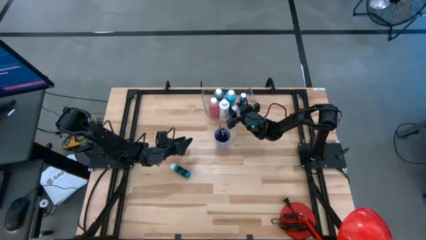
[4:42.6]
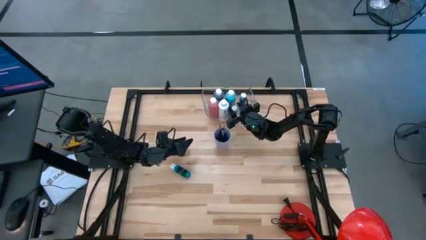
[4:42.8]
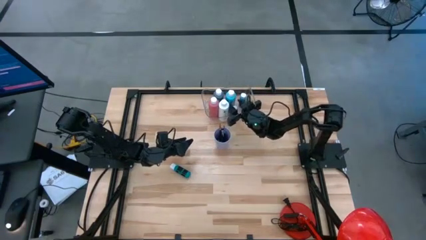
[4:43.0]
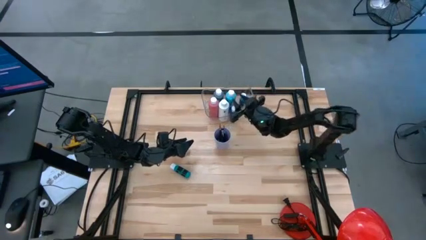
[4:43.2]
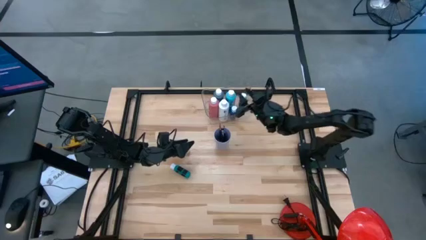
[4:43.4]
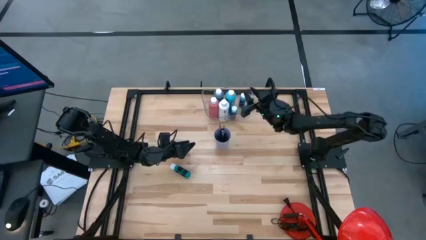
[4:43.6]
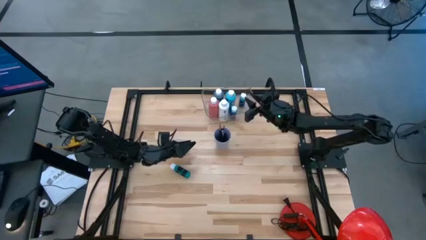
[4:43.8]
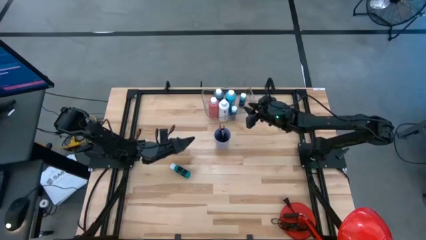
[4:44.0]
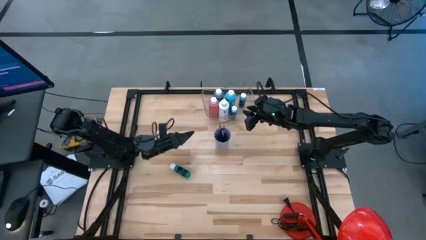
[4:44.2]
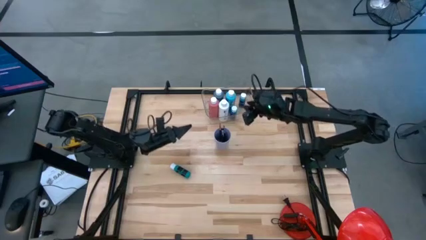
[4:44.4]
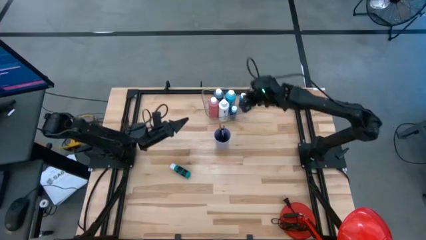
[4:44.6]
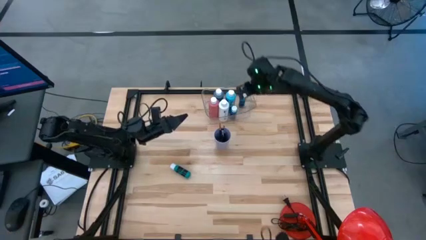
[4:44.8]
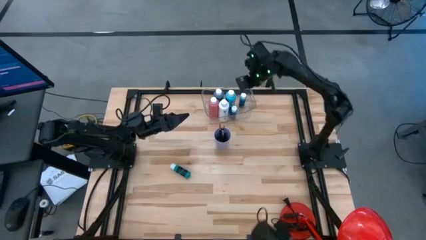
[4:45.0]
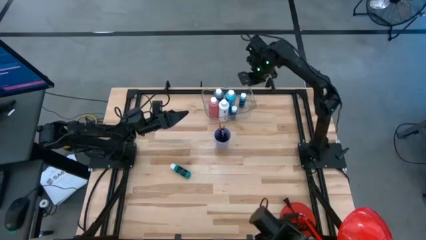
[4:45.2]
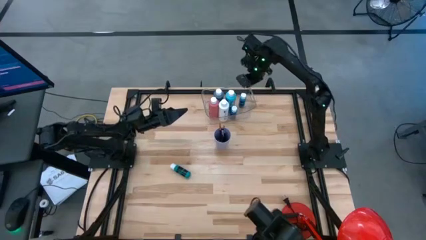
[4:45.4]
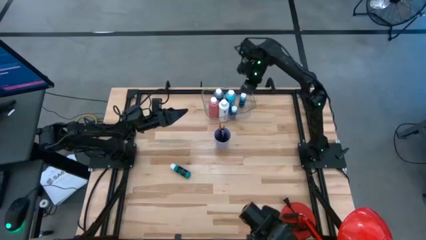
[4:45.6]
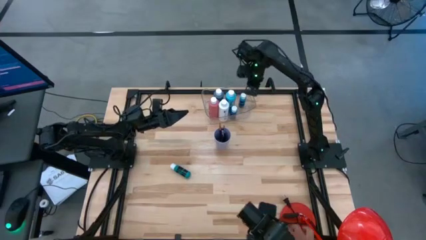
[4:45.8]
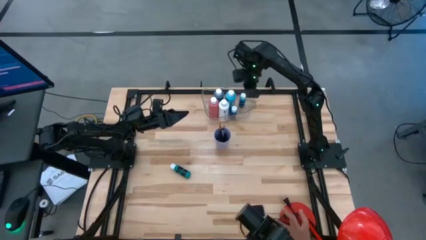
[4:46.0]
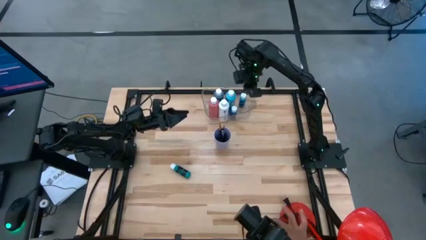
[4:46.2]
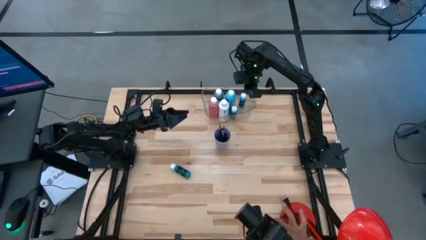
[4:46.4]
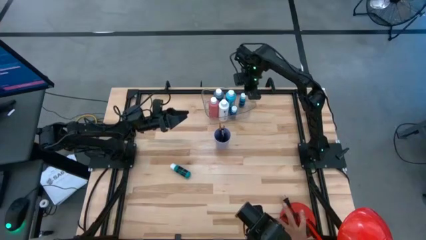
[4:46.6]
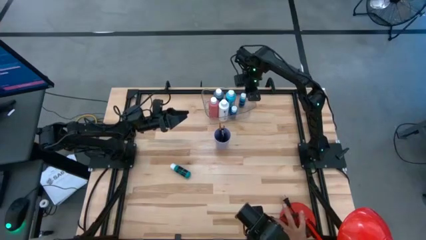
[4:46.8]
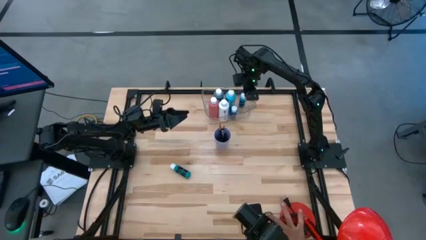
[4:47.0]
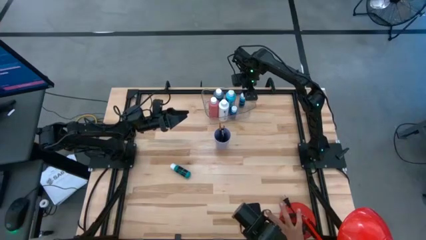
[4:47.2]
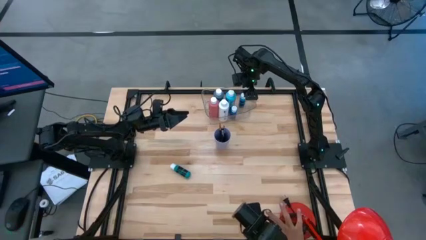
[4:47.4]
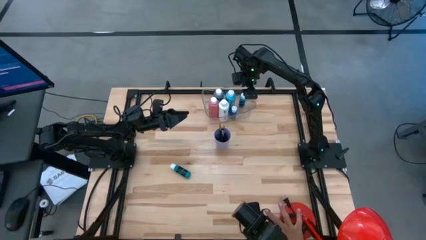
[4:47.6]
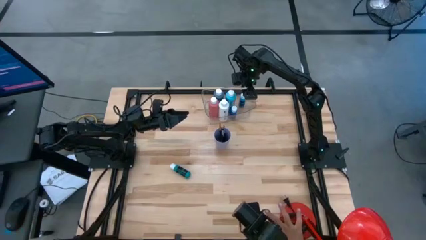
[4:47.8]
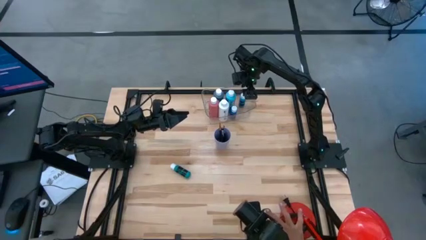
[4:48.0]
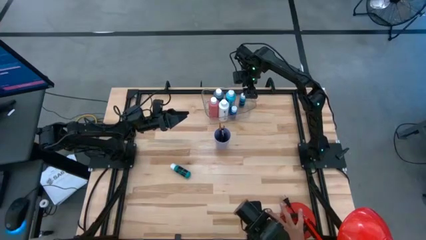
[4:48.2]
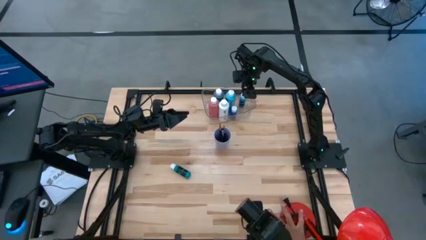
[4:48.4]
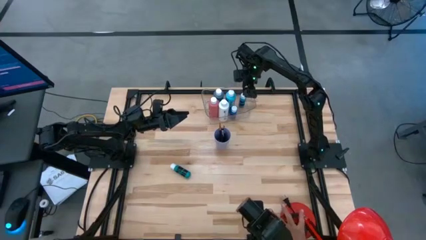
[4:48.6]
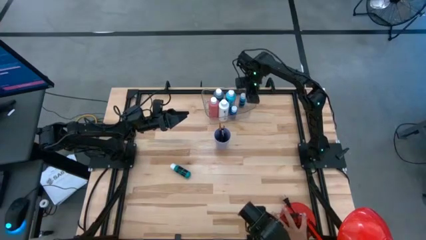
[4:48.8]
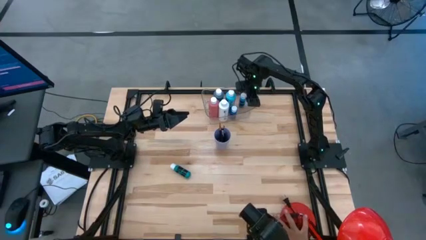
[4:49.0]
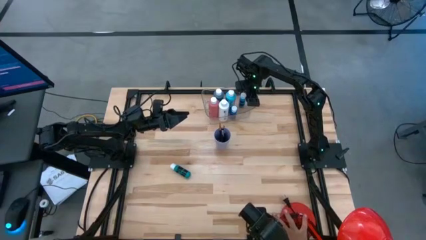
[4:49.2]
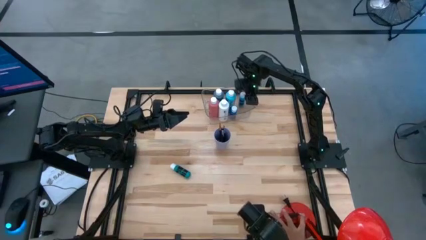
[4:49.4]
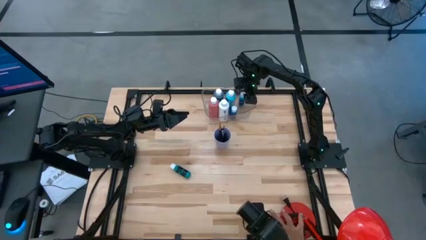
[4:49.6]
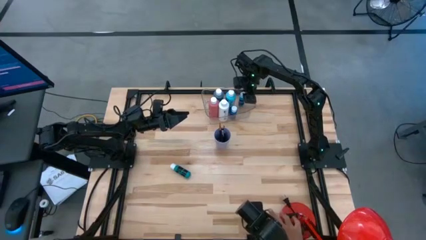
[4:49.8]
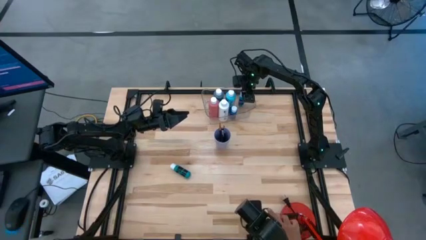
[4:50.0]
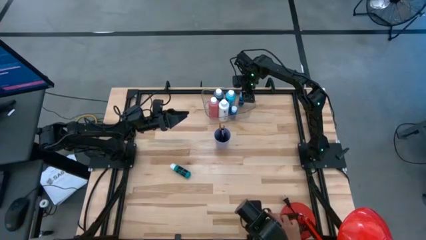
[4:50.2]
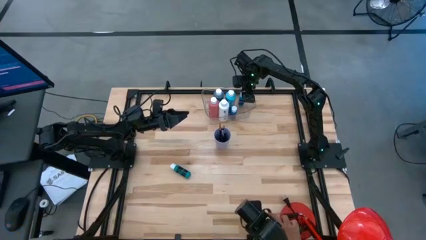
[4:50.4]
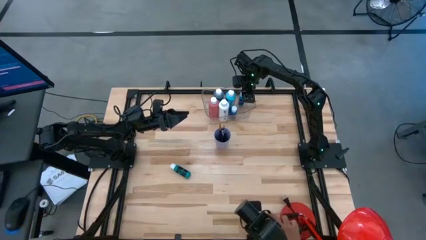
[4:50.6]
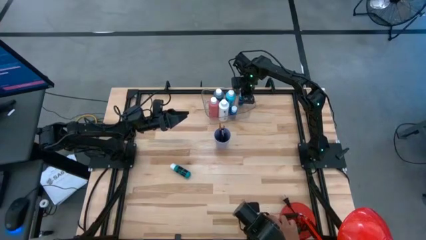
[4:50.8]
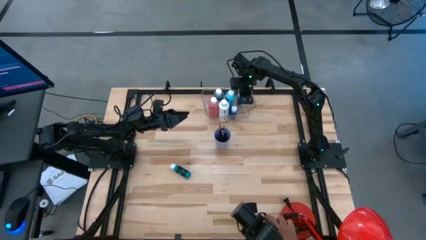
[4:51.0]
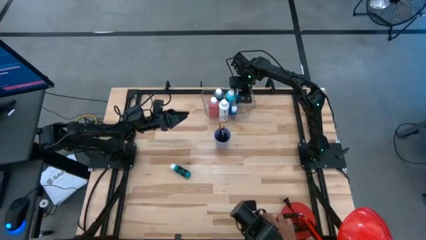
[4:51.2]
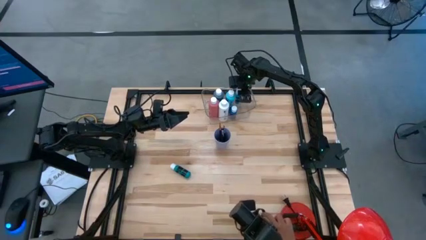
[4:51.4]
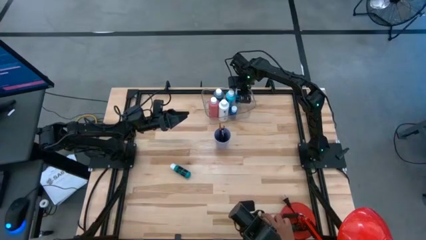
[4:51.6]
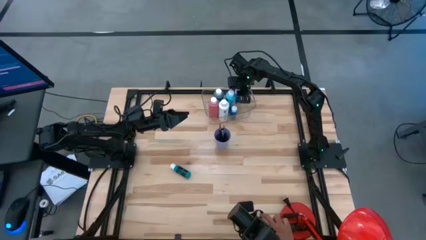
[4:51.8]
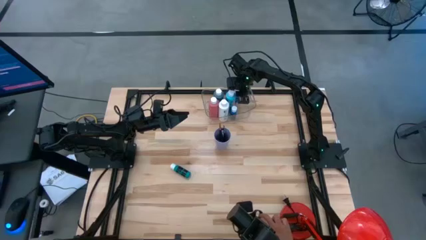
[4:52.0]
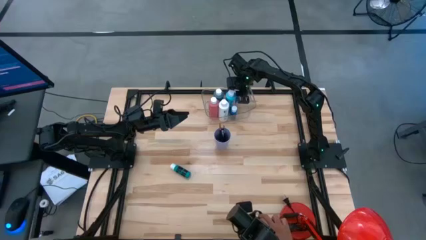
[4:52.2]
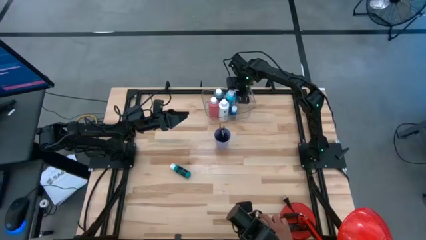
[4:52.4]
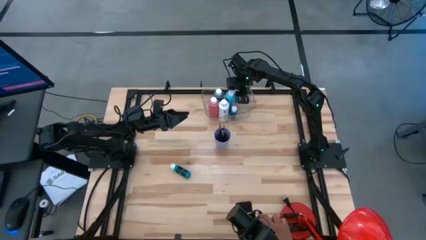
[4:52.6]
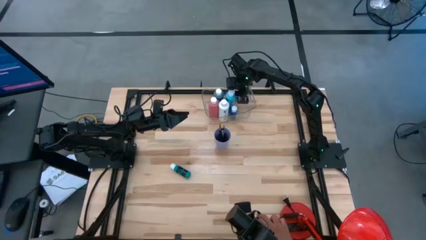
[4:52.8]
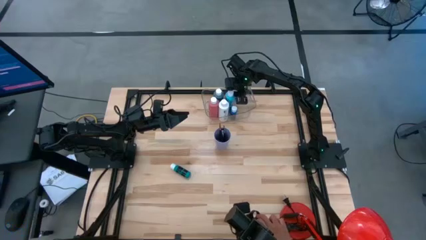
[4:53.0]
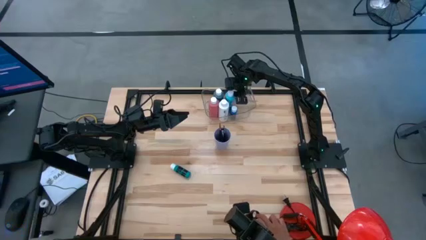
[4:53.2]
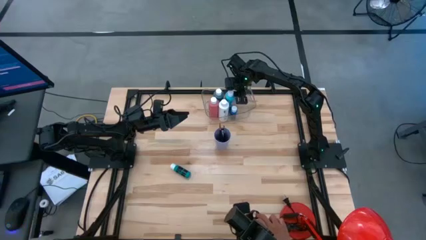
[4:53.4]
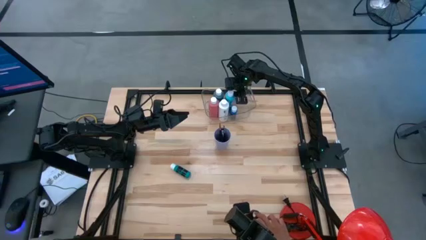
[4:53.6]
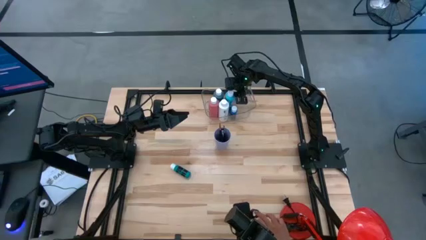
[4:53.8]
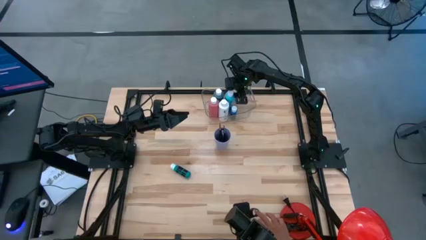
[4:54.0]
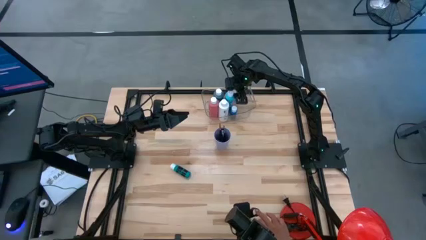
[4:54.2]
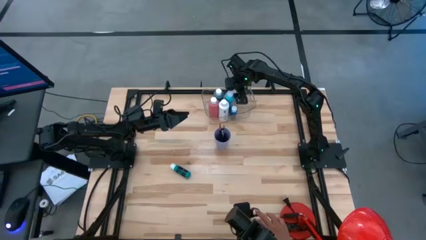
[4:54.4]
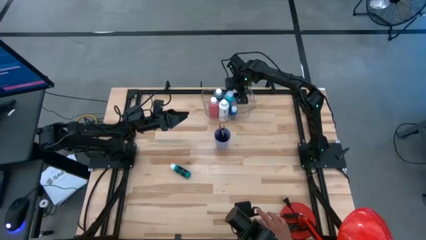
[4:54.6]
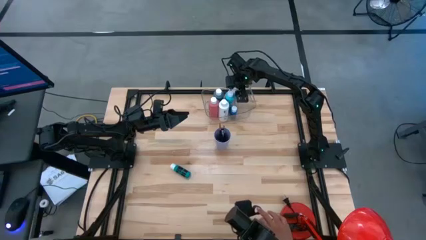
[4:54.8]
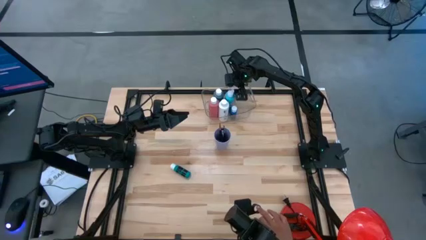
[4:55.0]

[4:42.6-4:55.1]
Task: Pick & Place Paint Supplies
Adjust the light blue paint bottle

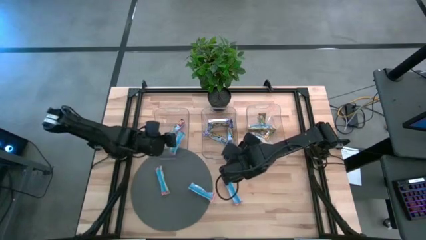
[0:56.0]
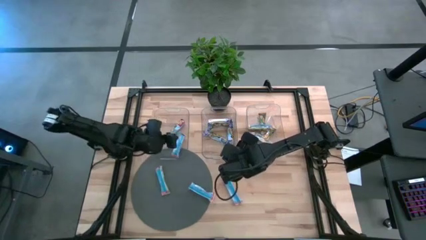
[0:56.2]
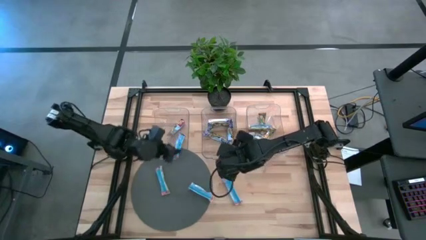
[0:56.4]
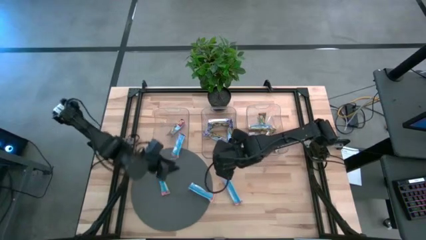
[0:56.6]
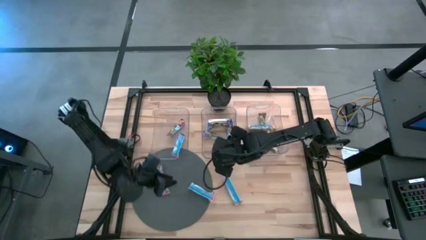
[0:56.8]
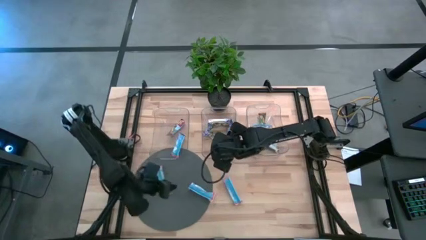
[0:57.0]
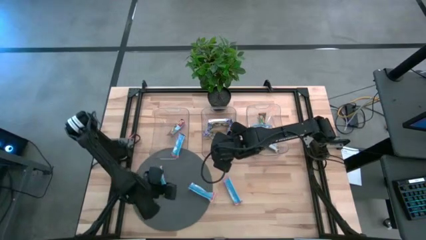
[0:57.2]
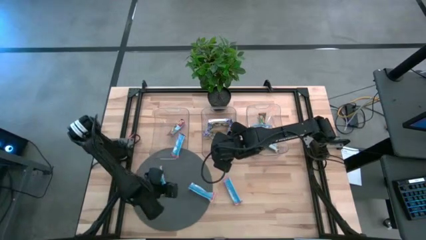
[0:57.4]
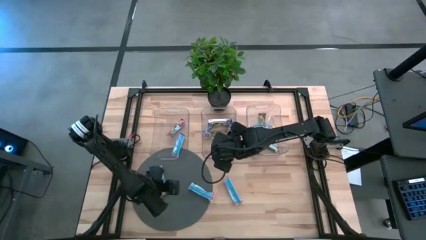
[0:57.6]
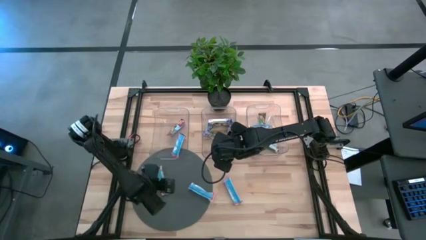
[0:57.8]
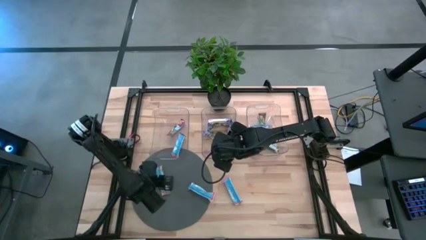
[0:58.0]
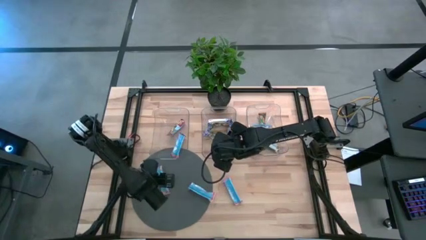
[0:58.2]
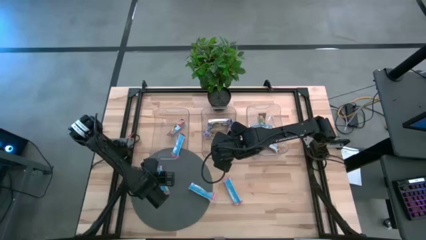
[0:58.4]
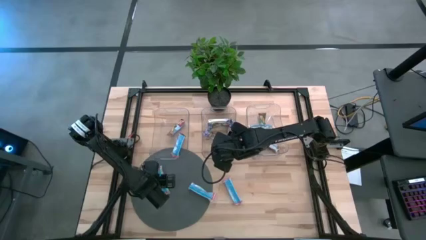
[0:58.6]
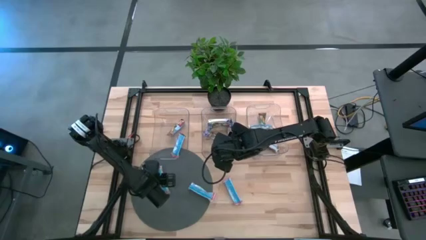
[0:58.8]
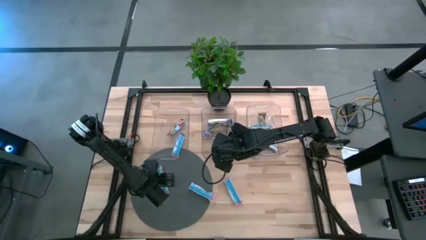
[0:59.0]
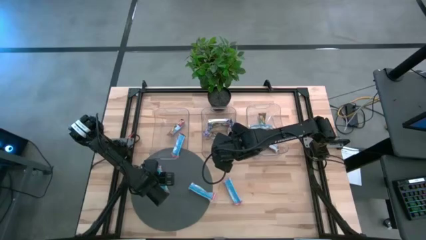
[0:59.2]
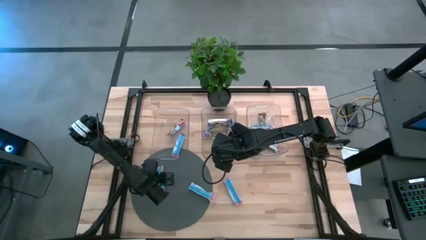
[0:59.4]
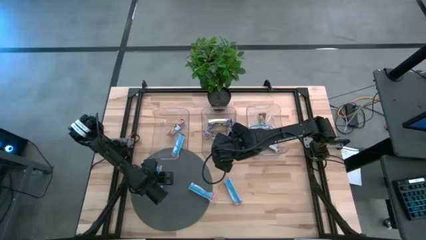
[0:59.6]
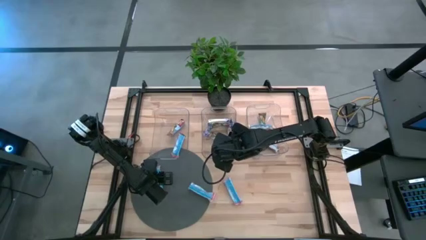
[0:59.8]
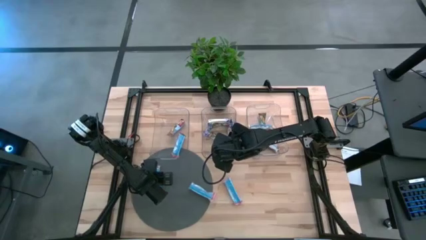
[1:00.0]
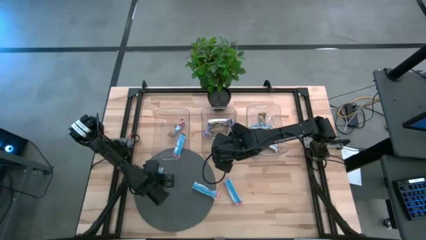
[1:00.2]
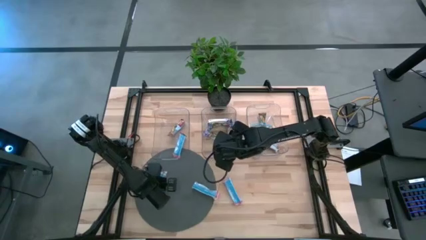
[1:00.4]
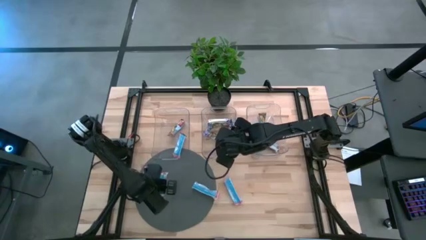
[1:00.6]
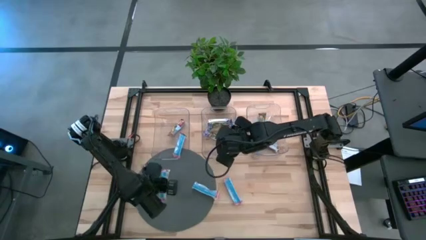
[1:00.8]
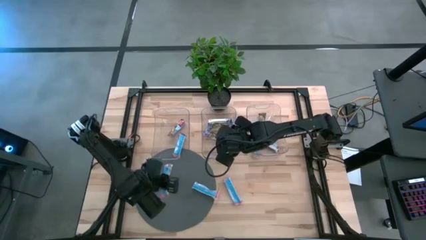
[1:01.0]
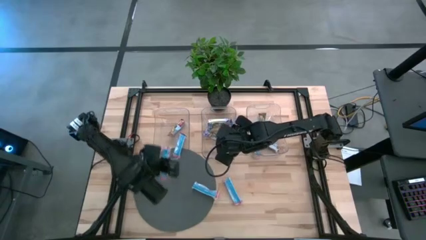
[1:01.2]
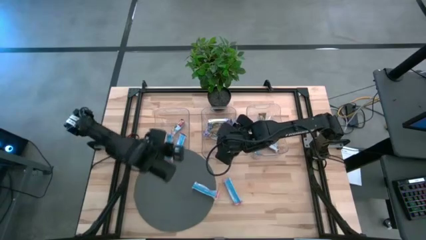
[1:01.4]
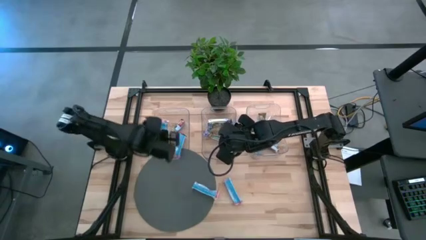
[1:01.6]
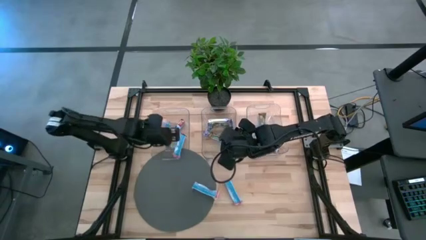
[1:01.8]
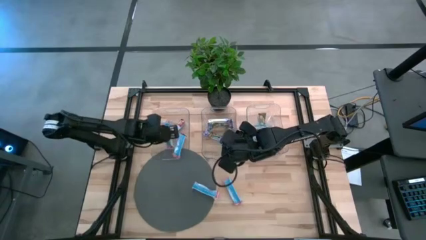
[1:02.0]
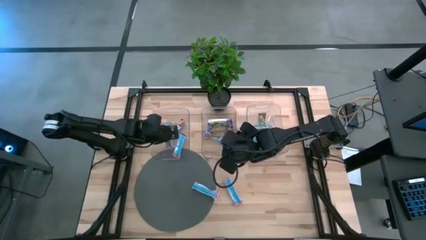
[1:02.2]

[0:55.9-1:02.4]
Task: Pick and place Granola Bars by type
Put the red granola bar into the left transparent bin
